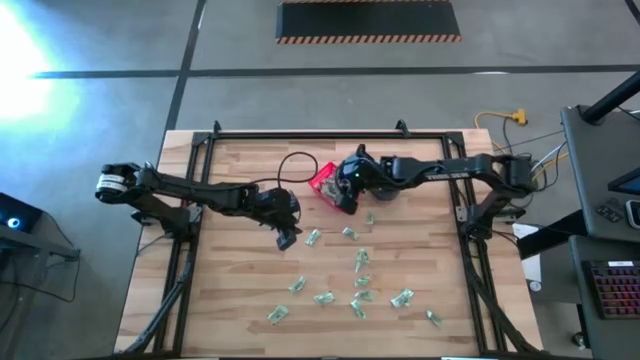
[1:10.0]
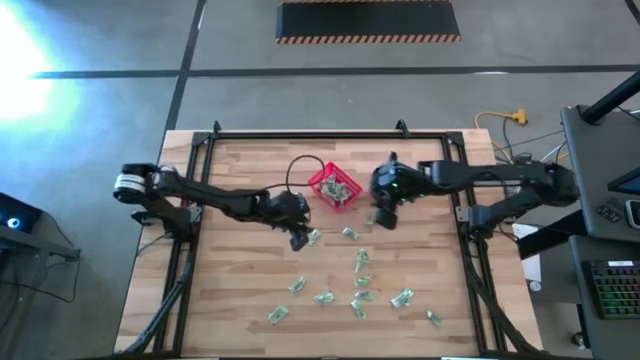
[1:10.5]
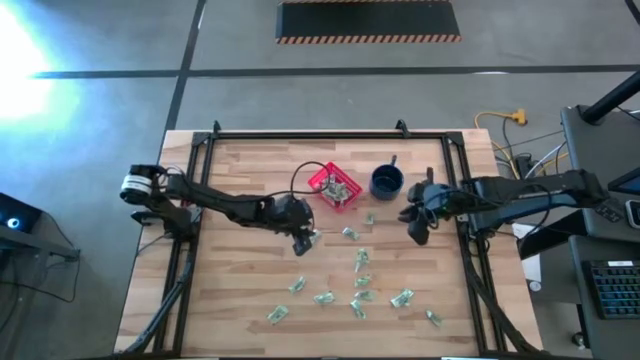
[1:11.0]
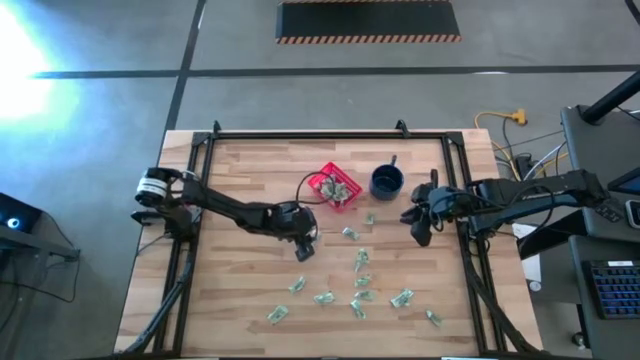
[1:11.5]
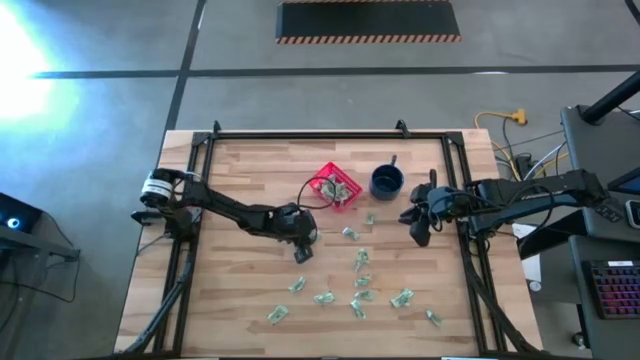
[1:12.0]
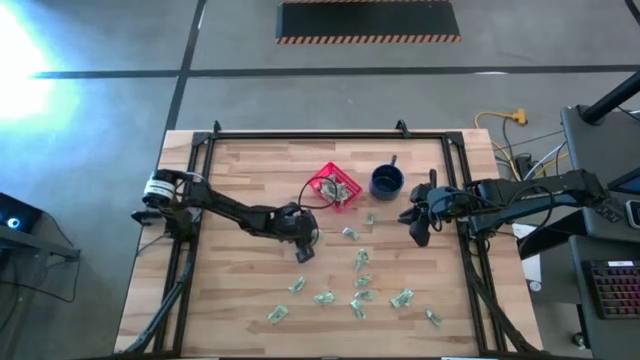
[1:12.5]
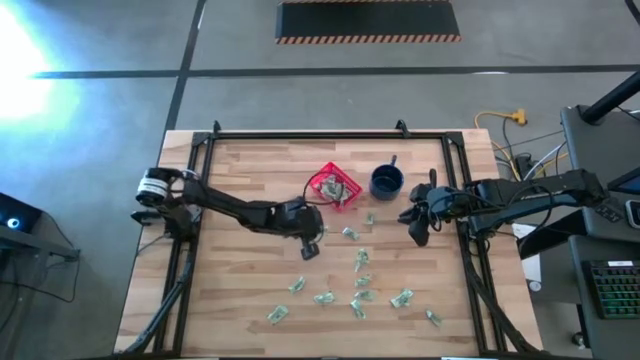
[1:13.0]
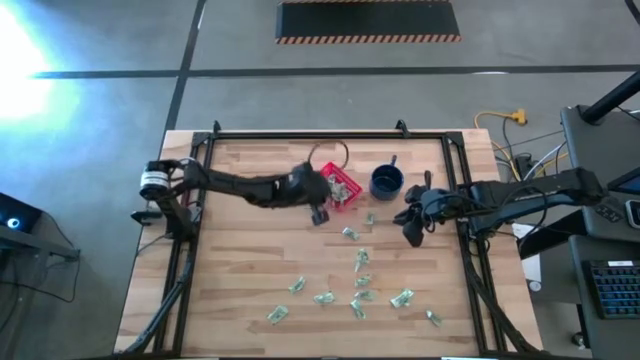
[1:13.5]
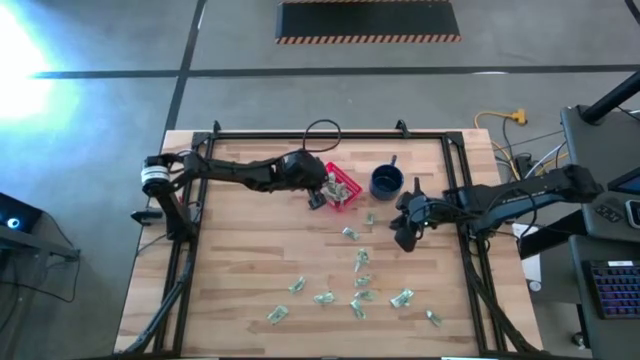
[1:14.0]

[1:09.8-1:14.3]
Task: Pick and place Stevia / Truvia into bins
Put the stevia packet into the red basket

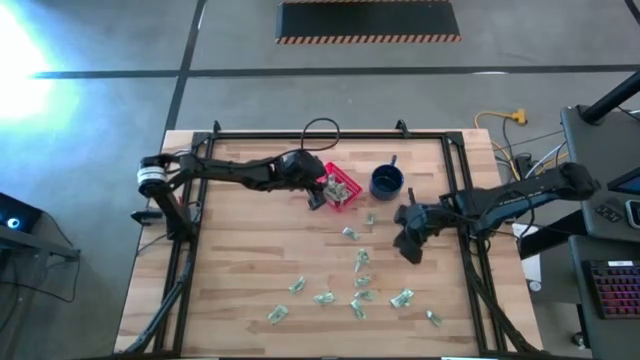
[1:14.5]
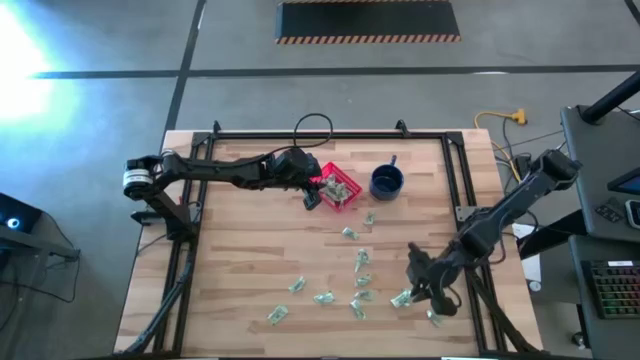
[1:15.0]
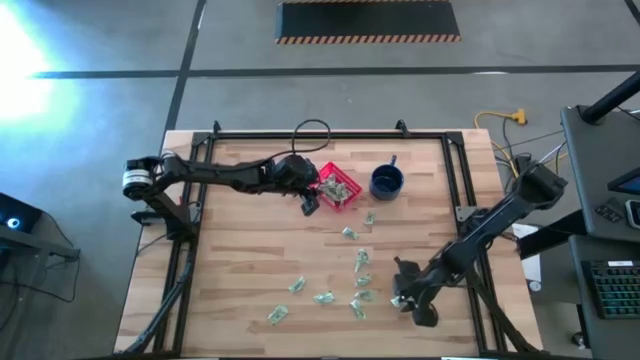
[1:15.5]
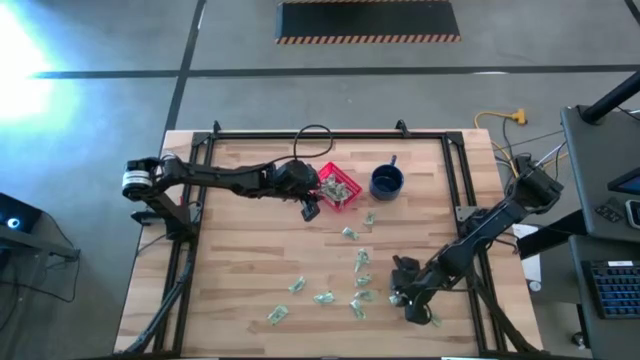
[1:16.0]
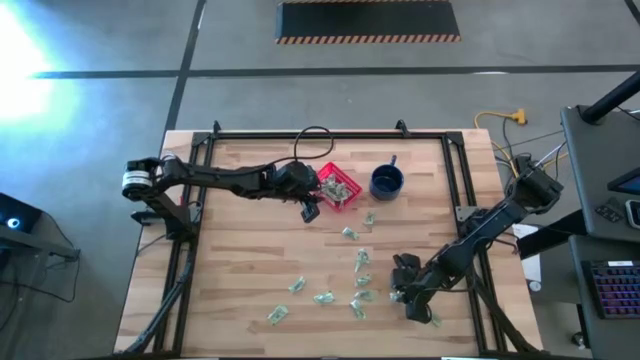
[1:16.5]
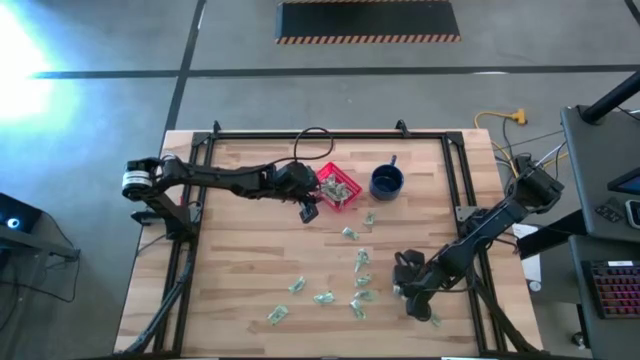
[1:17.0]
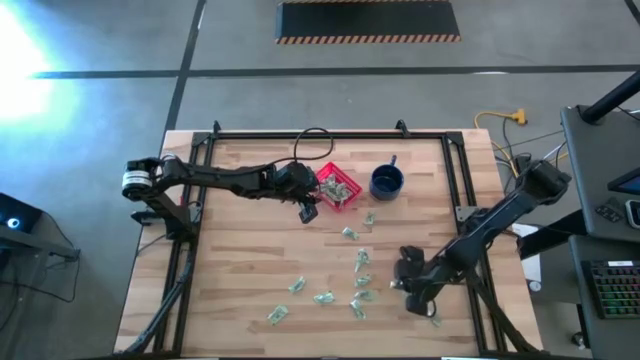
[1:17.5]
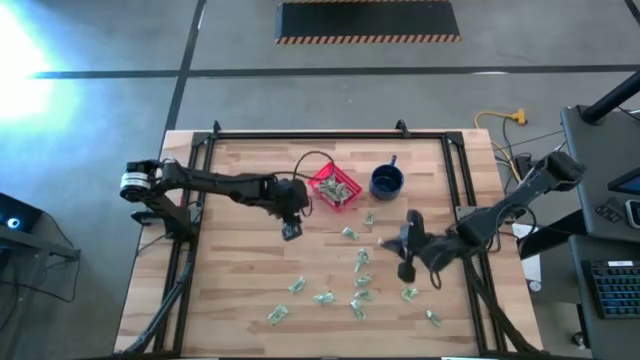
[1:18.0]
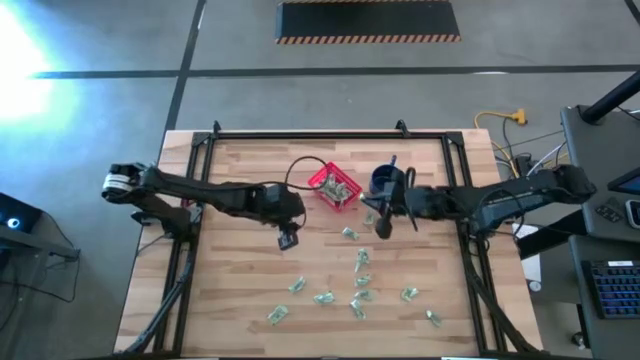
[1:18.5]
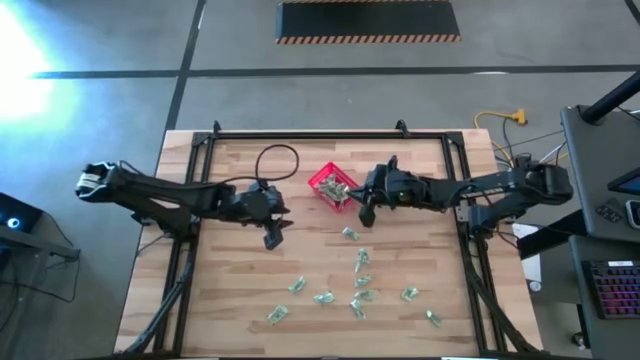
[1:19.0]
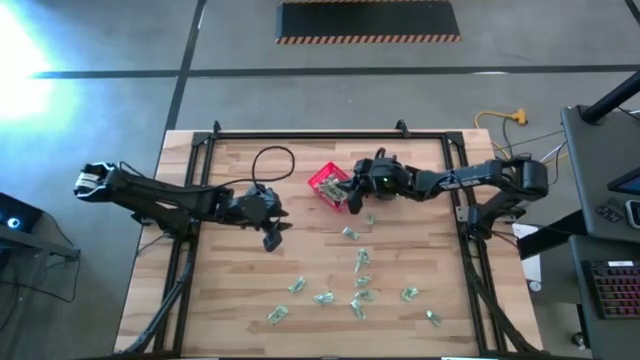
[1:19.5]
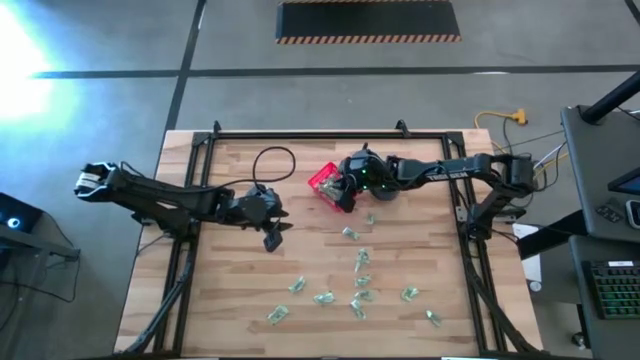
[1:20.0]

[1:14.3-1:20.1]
Put the stevia packet into the red basket

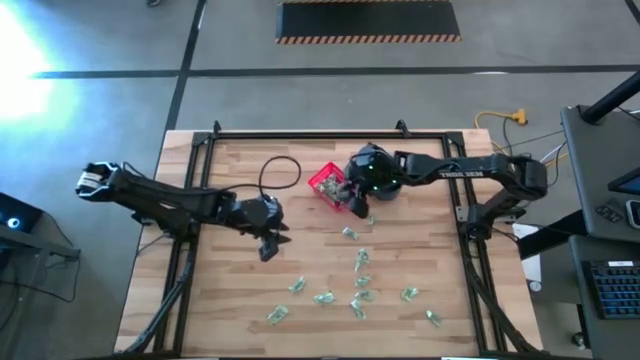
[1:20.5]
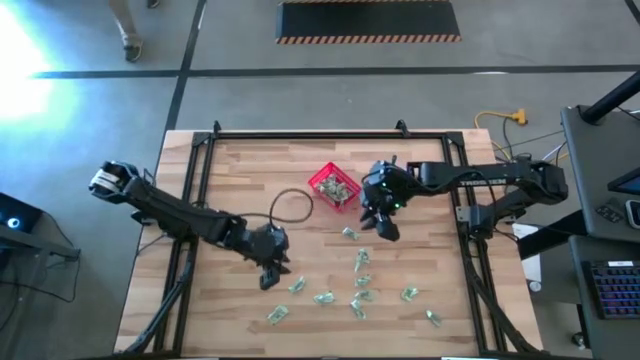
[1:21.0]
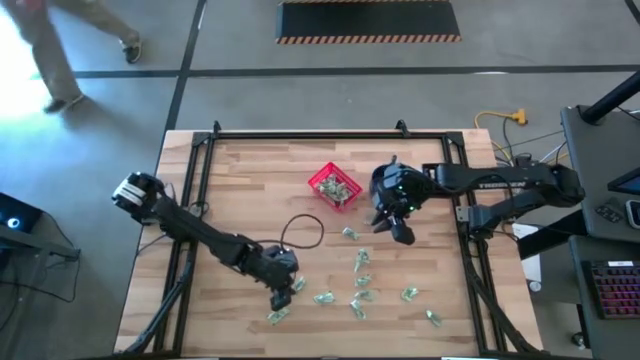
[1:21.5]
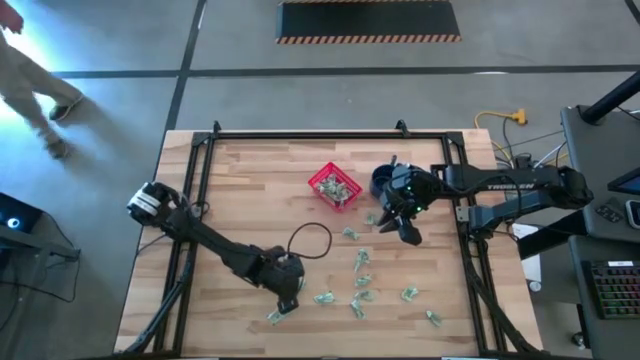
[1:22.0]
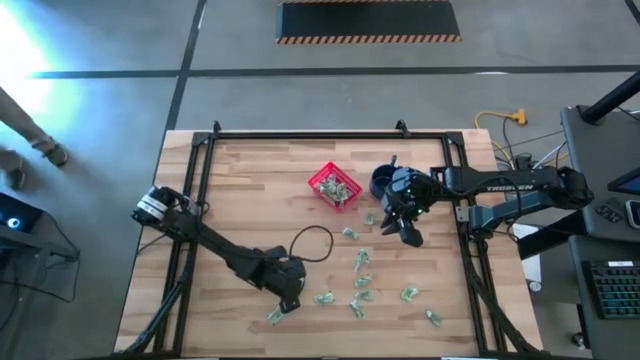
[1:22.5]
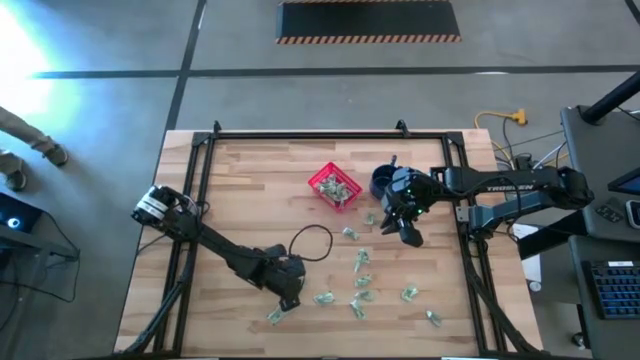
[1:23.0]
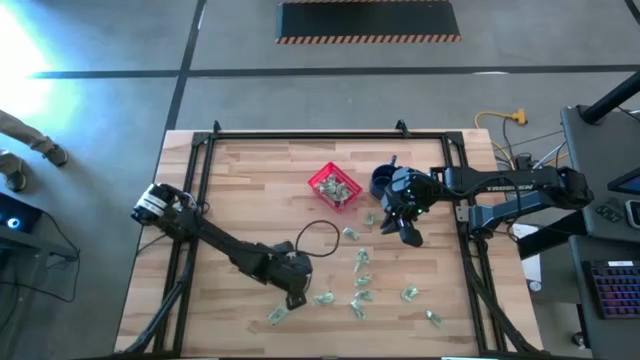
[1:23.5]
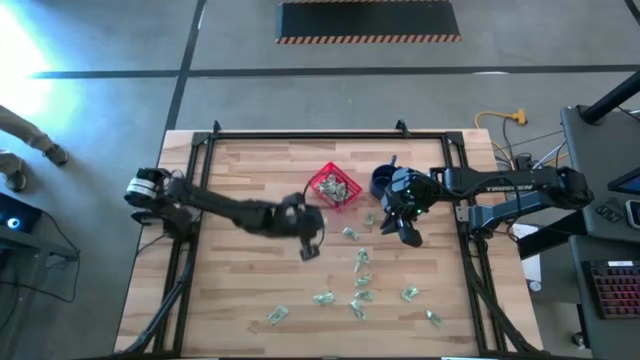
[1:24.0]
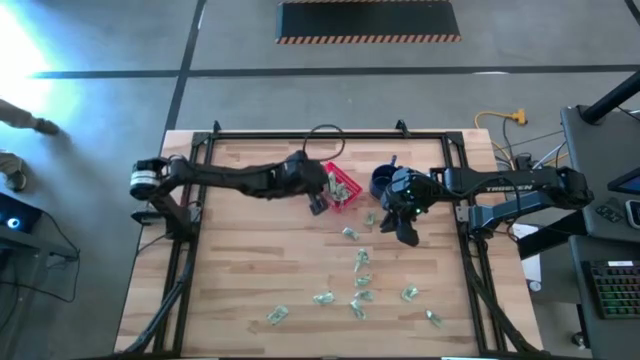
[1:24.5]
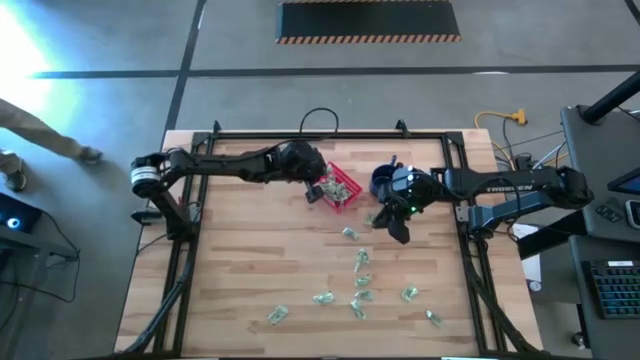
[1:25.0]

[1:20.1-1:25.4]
Put the stevia packet into the red basket

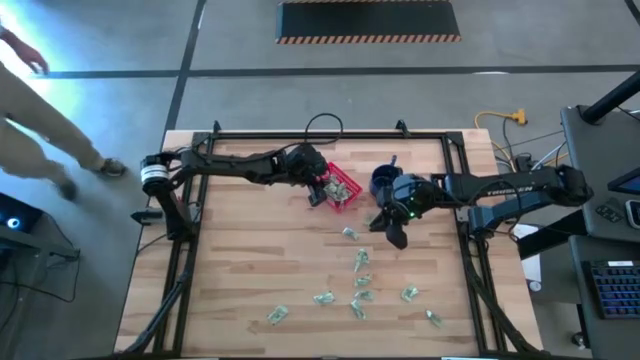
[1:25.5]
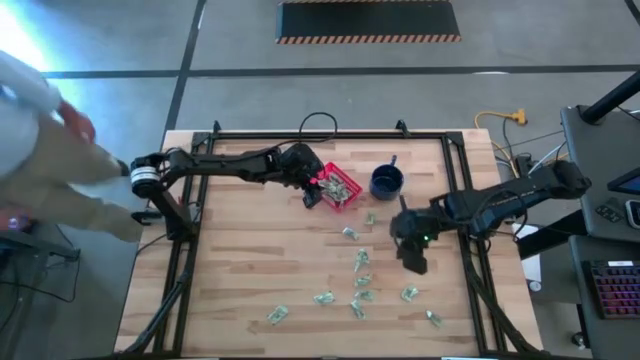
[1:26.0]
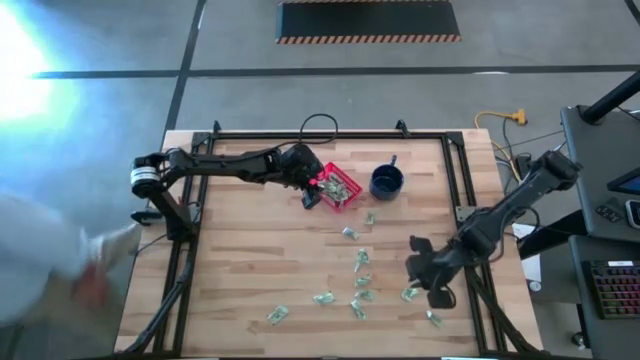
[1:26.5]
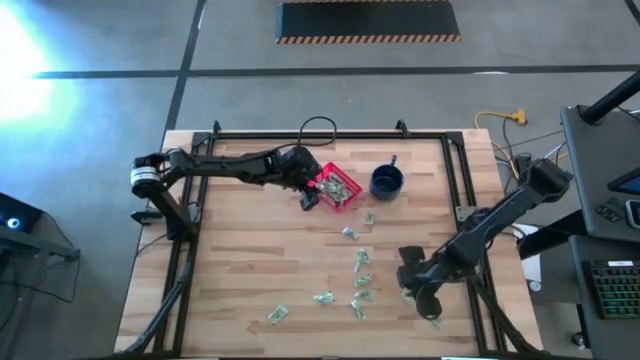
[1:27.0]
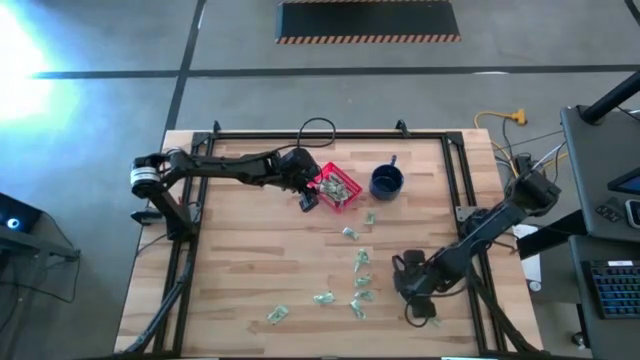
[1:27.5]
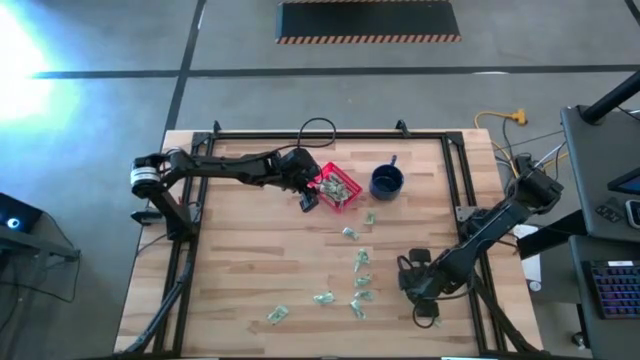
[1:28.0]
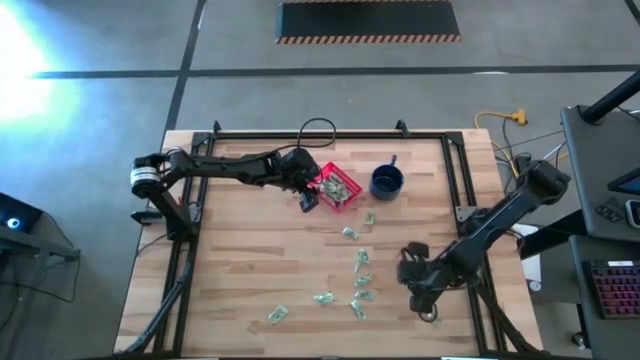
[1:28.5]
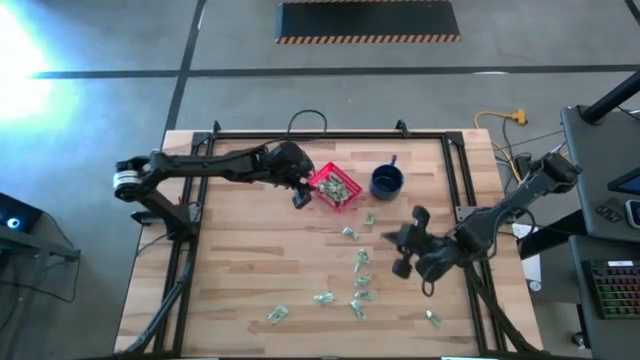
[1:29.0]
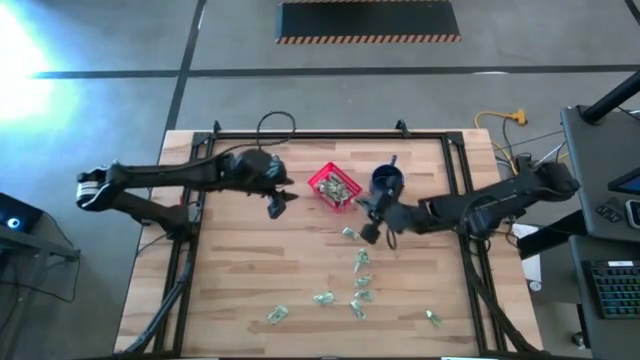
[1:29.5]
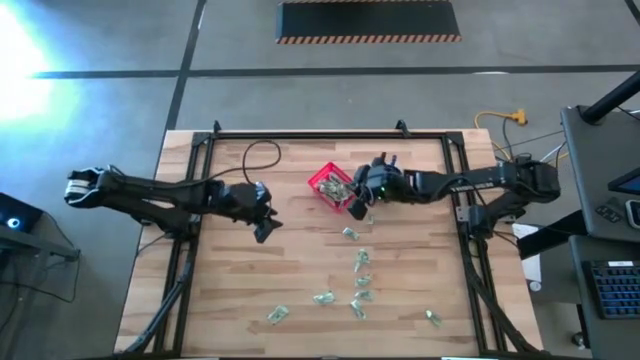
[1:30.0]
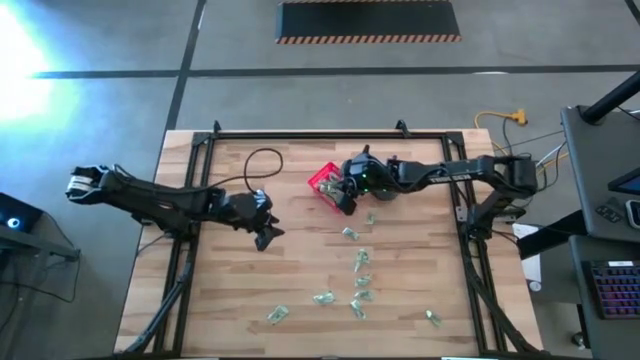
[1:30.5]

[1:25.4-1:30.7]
Put the stevia packet into the red basket

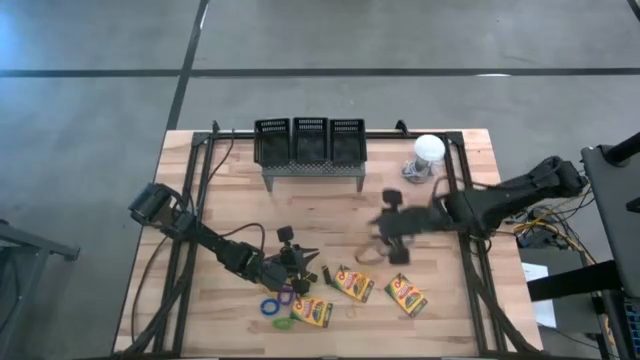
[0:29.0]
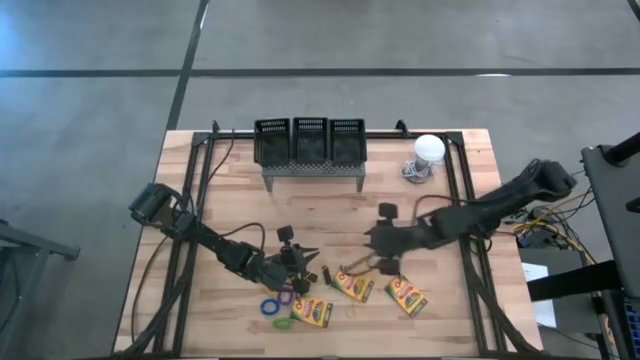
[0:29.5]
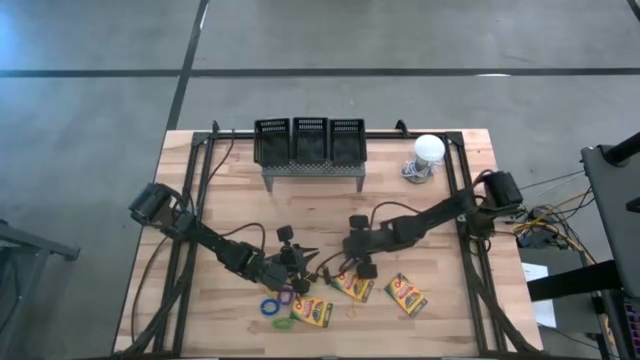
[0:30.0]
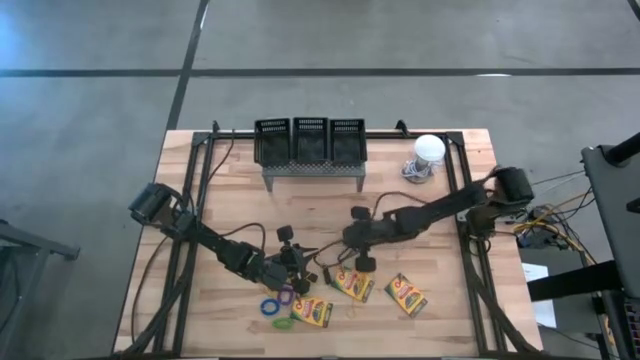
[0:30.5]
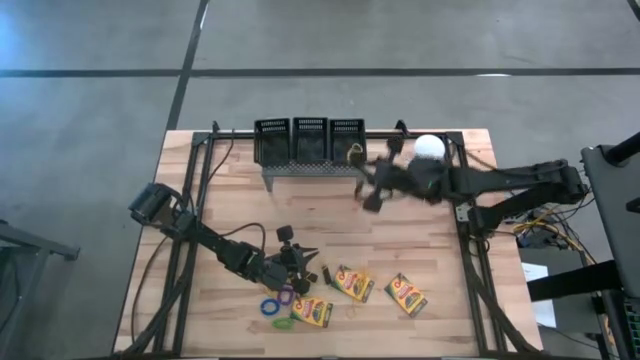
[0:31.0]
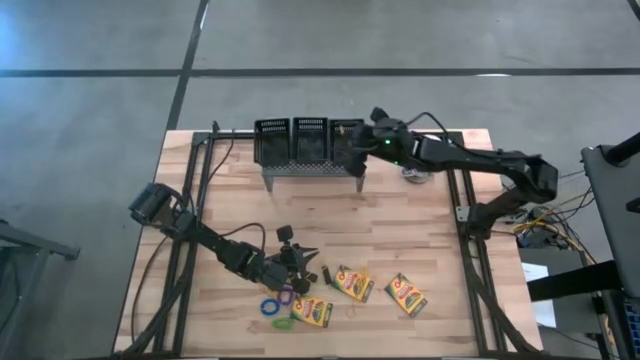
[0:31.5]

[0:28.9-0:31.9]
Task: Pick & Place Office Desk Supplies
Put the yellow rubber band into the right black basket on the shelf
